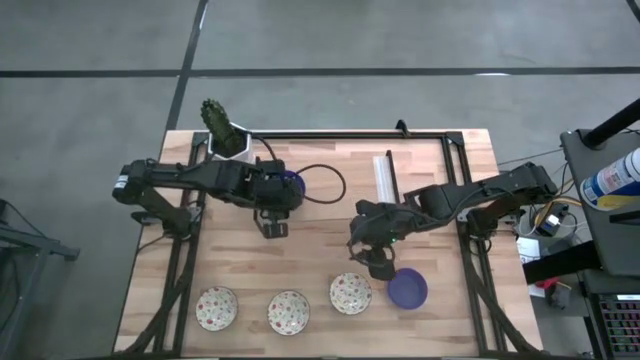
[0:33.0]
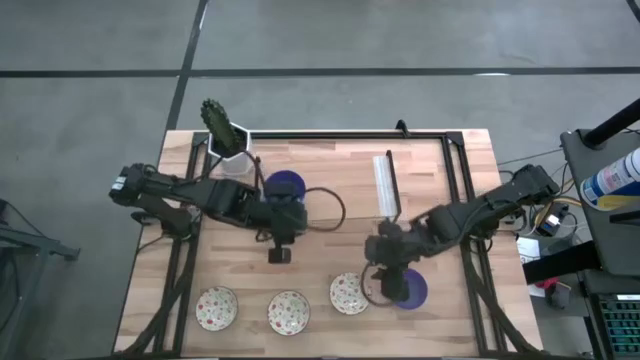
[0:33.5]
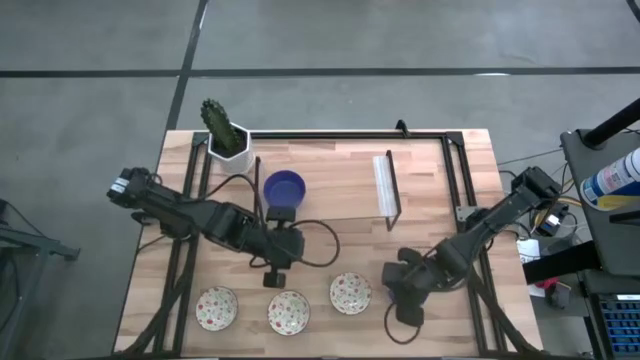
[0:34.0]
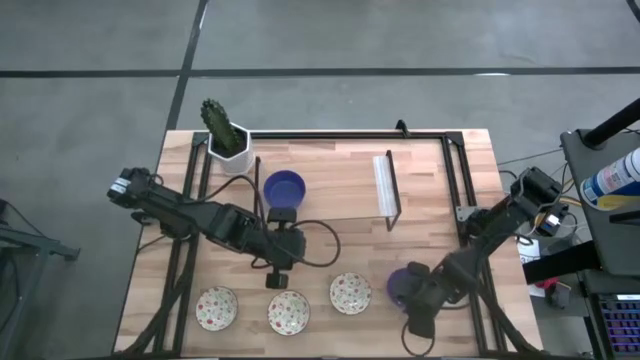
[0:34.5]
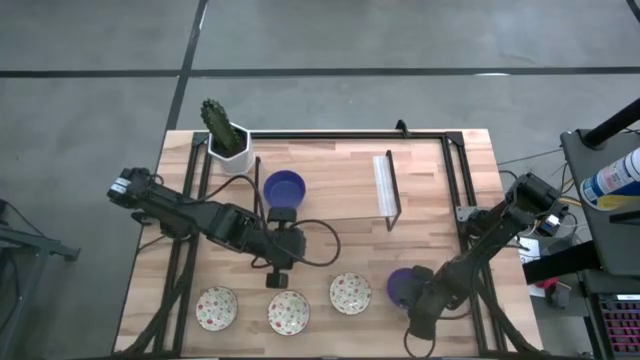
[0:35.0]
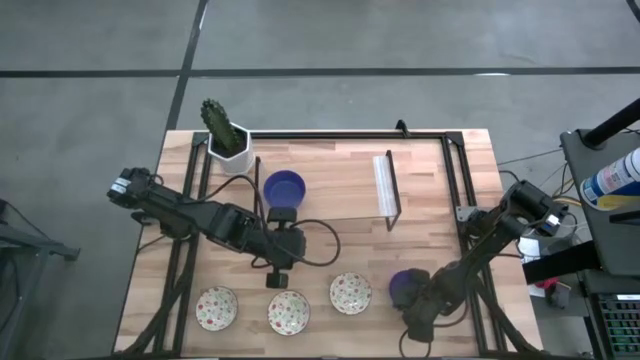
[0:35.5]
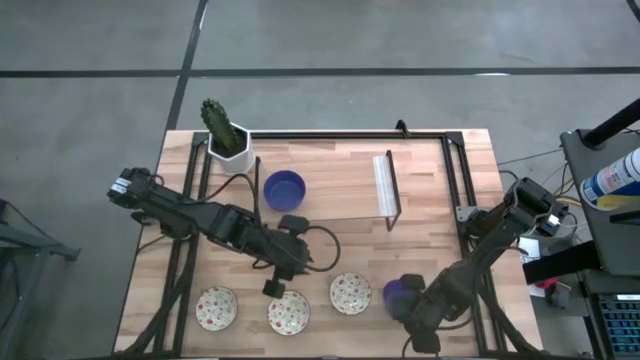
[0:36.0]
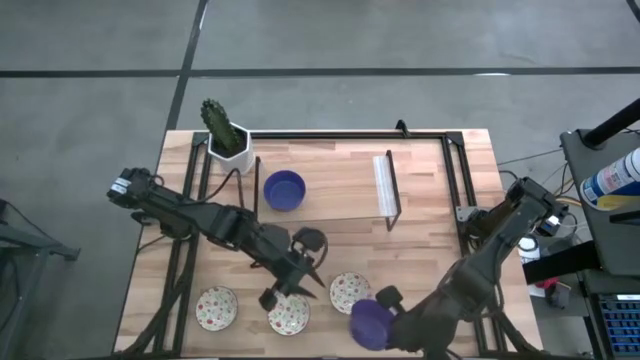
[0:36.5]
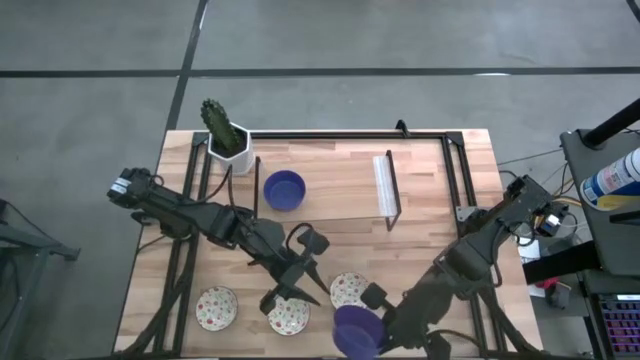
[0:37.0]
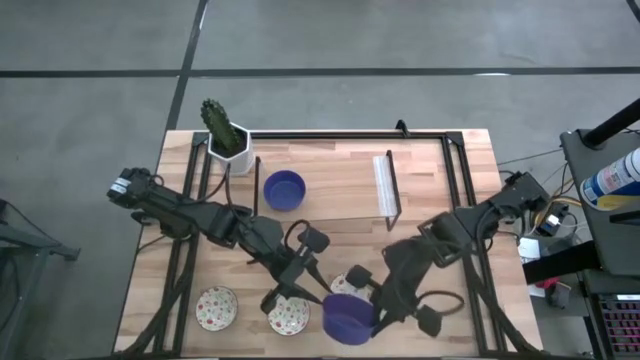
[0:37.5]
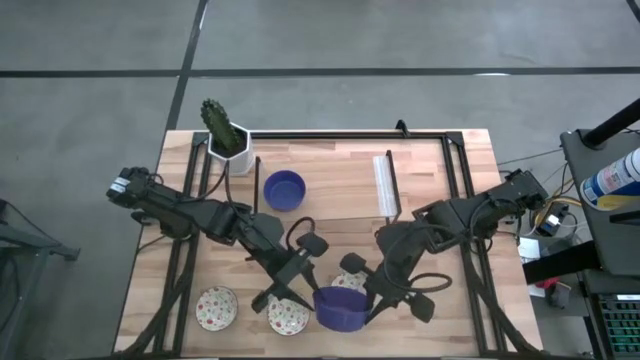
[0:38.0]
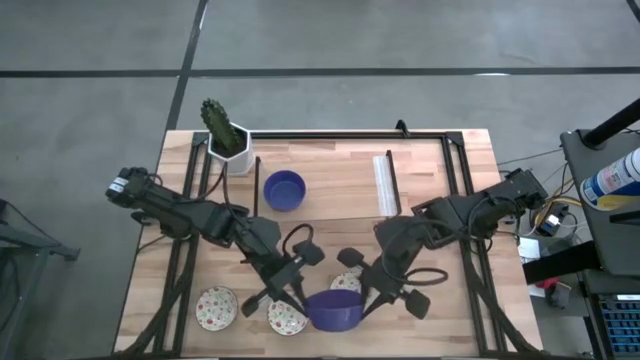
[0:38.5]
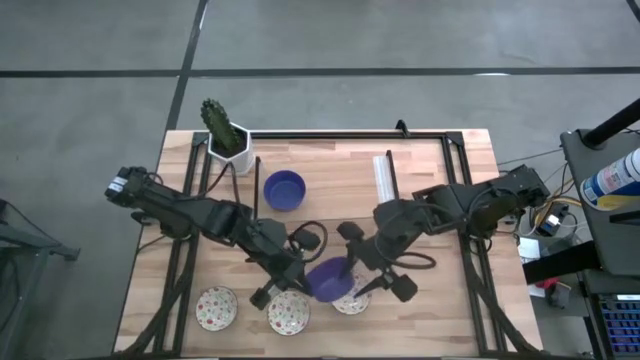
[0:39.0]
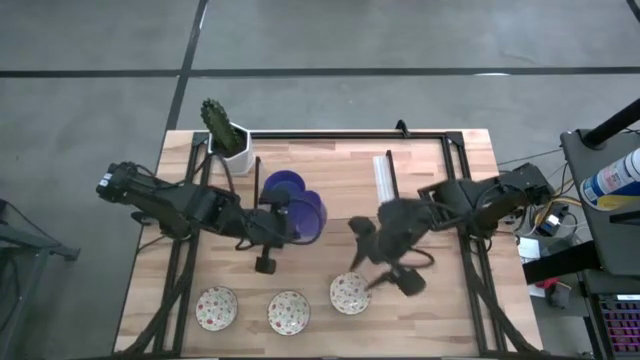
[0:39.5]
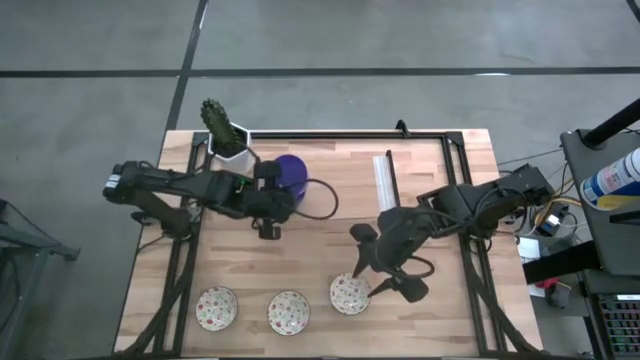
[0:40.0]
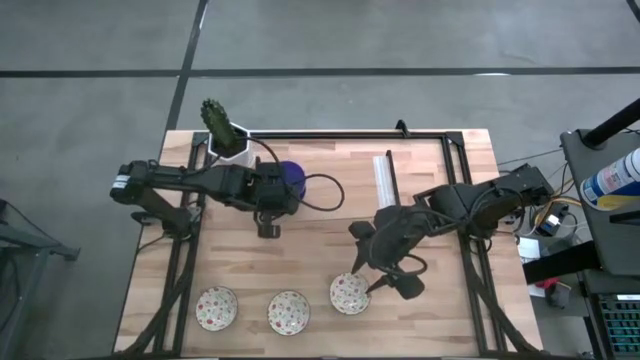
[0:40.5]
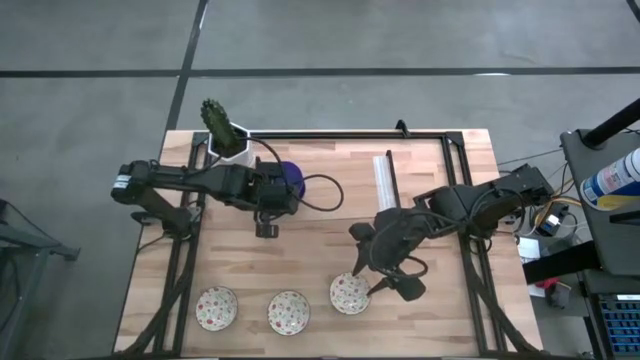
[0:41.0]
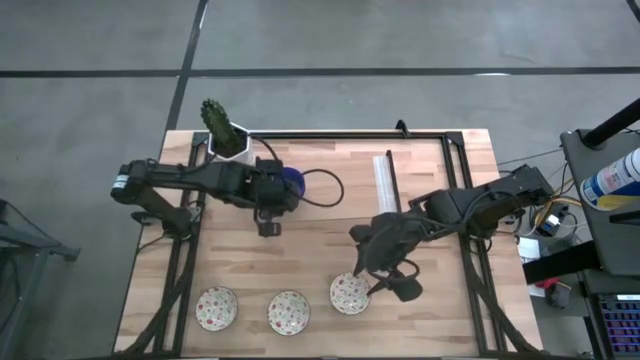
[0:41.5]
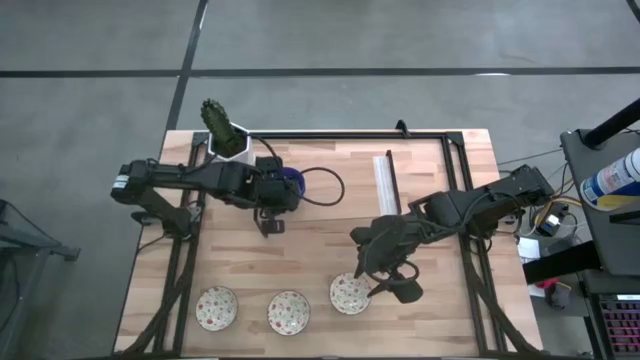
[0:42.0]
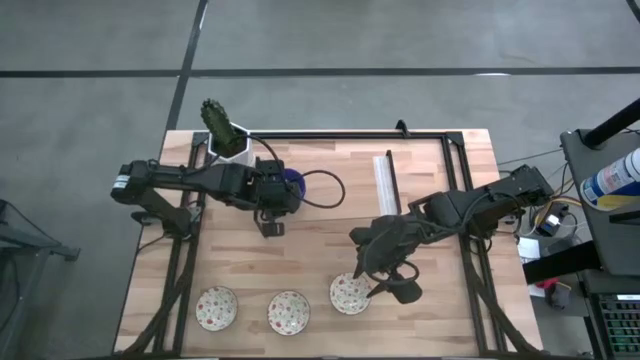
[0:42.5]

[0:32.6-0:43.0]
Task: Pick & Place Mini bowls
Stack the blue bowl on the blue bowls on the shelf

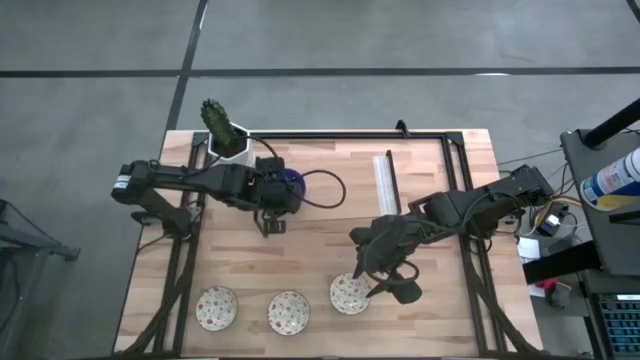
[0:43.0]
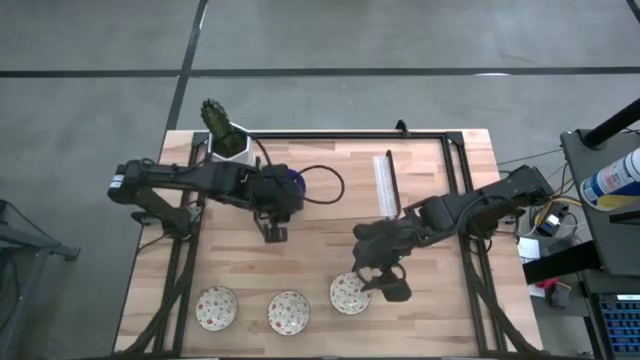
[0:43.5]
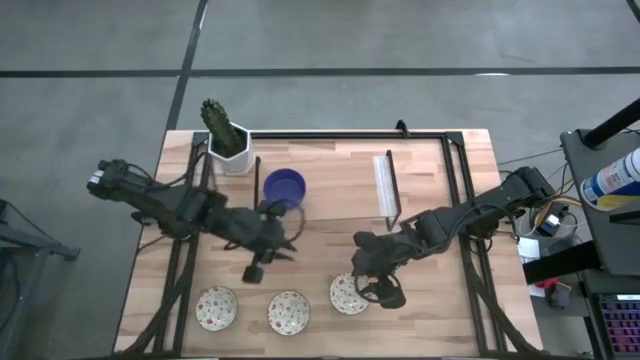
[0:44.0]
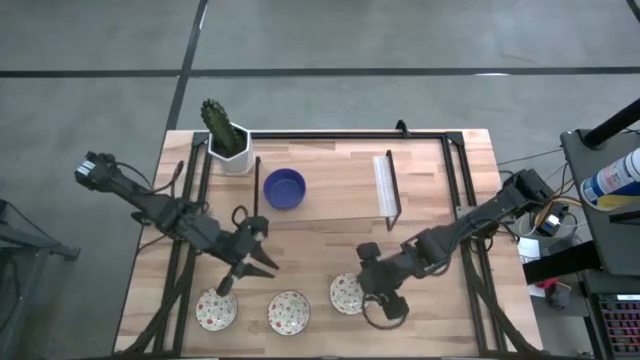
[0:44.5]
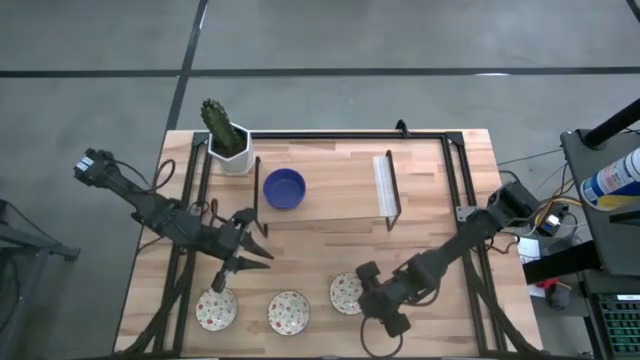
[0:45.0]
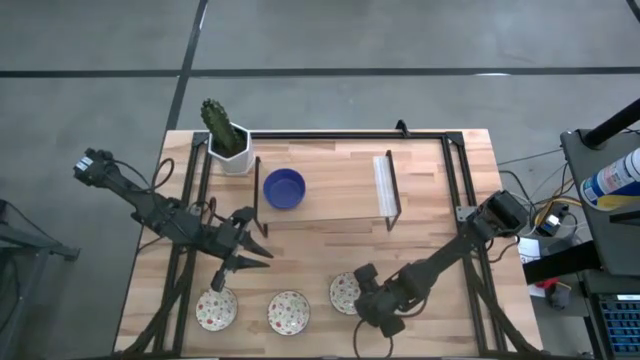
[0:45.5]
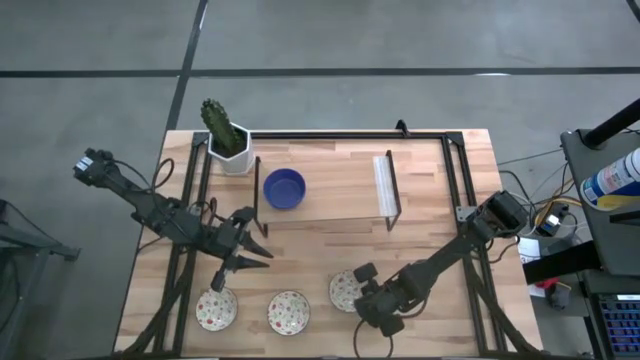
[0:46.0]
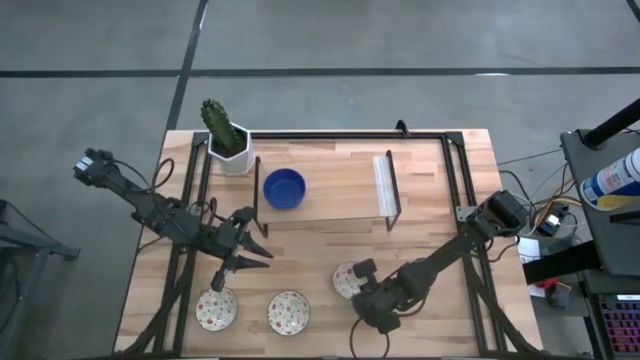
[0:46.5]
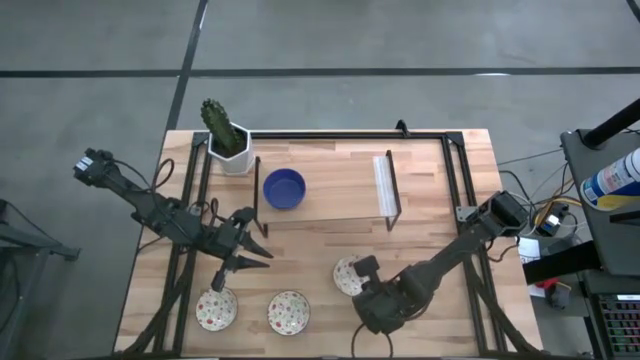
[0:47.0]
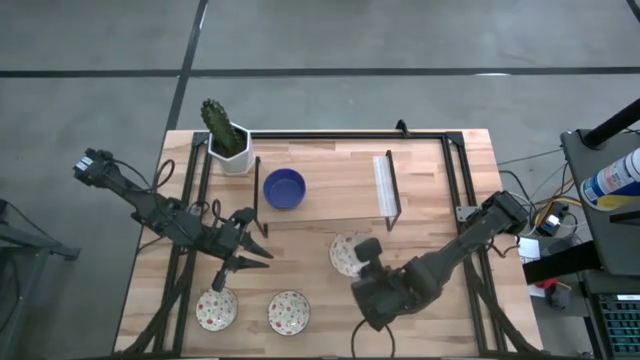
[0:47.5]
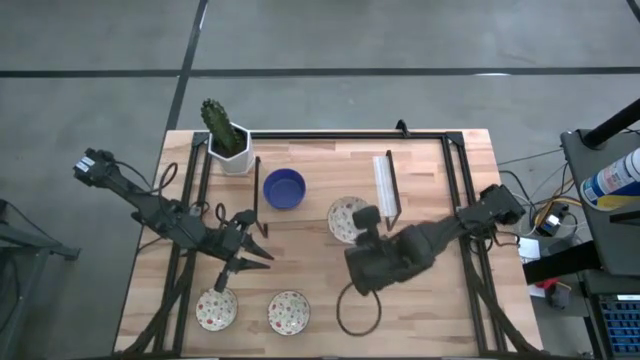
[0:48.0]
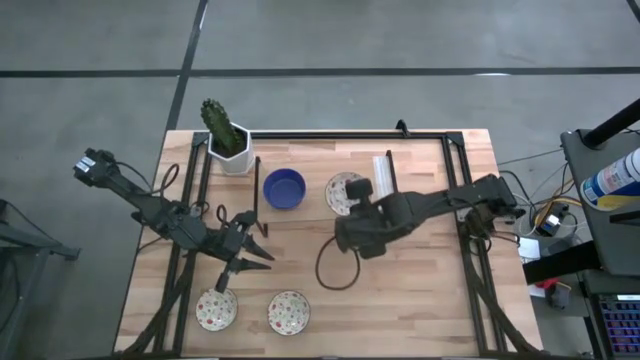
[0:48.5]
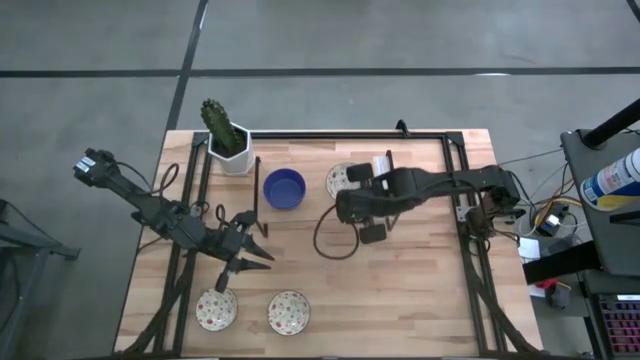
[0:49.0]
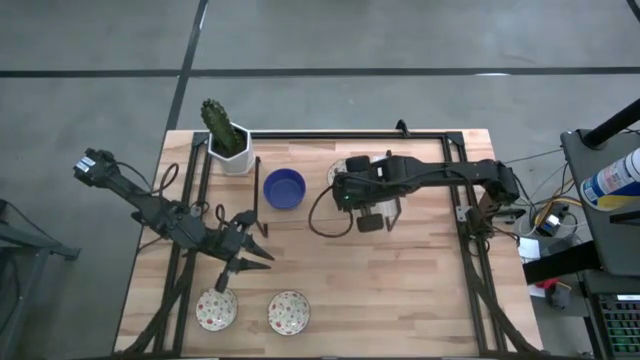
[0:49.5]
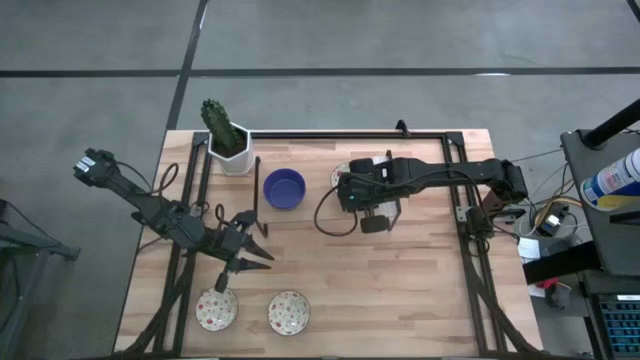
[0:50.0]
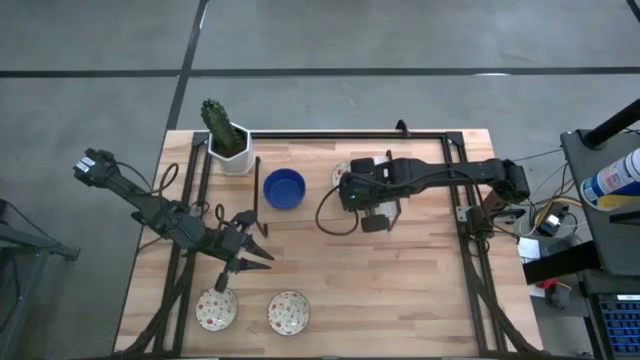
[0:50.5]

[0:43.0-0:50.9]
Put the right white patterned bowl on the shelf

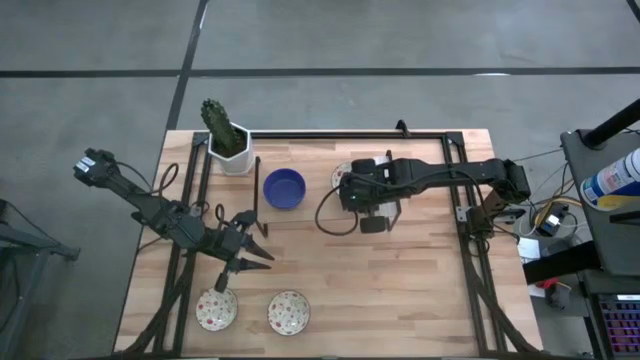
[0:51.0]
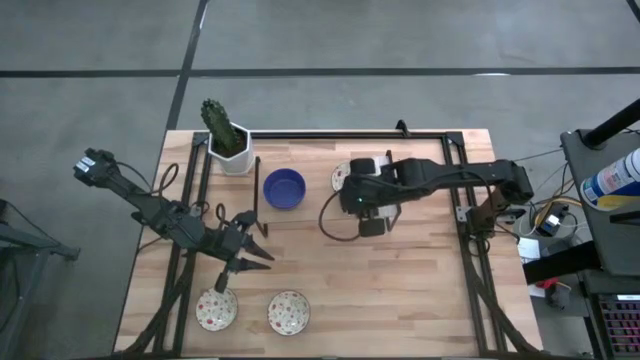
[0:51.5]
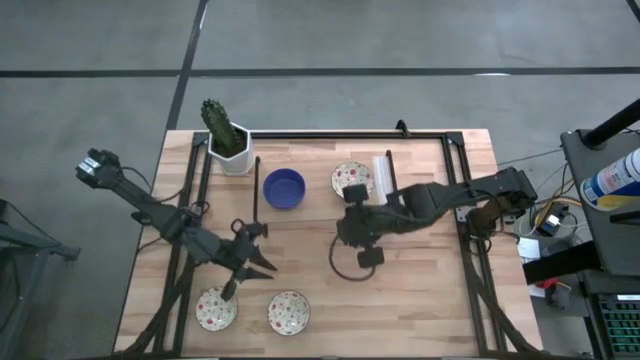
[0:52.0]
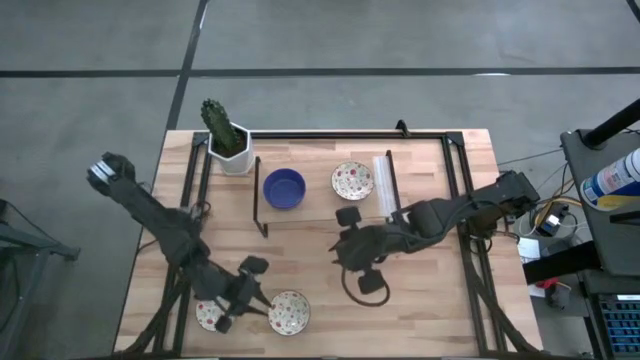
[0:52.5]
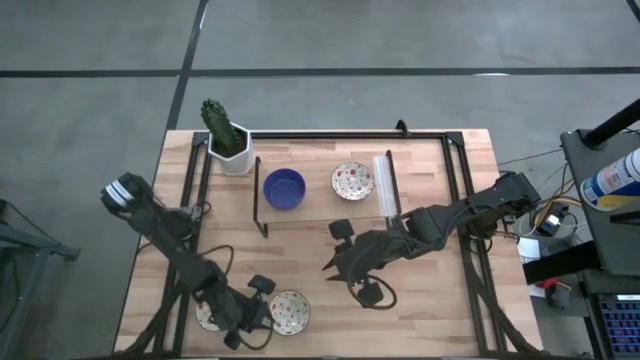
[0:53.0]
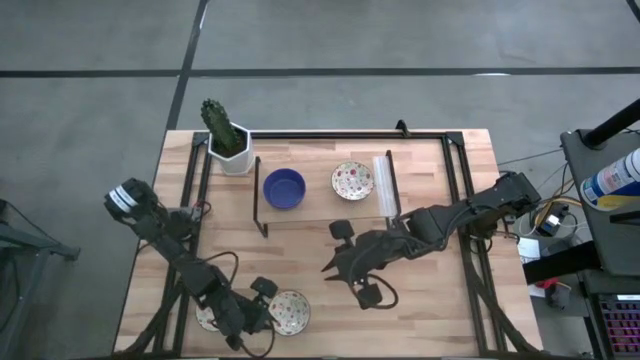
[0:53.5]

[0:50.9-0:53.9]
Stack the right white patterned bowl on the white patterned bowl on the shelf
